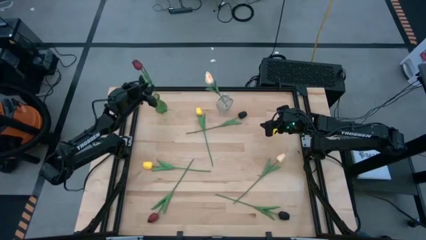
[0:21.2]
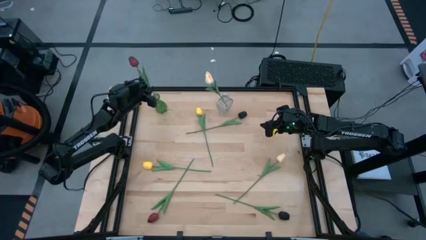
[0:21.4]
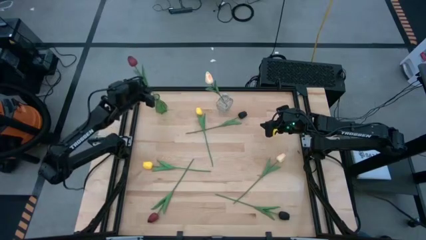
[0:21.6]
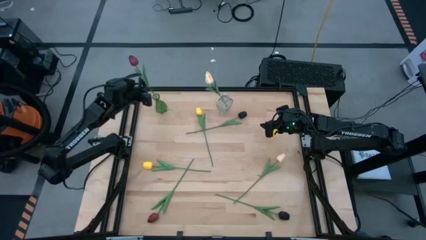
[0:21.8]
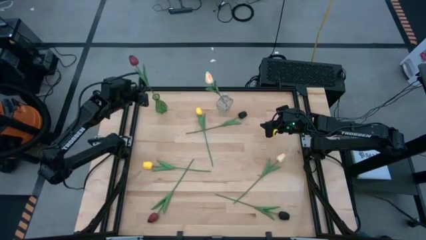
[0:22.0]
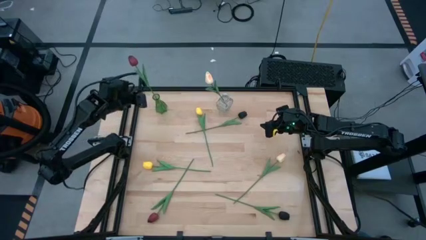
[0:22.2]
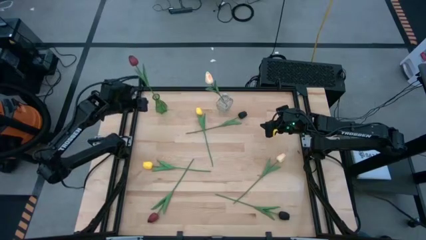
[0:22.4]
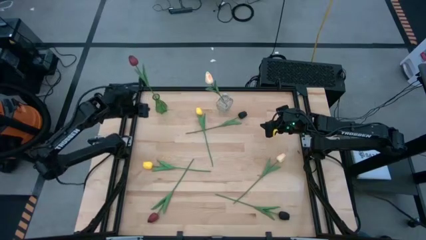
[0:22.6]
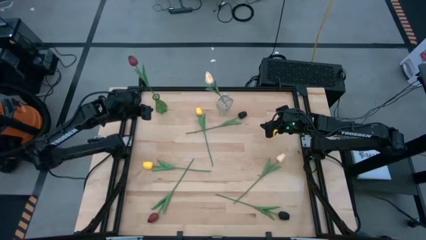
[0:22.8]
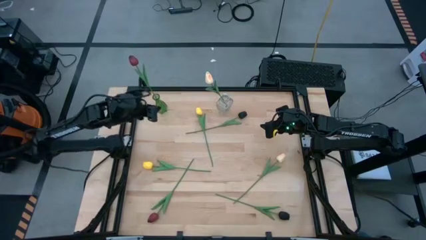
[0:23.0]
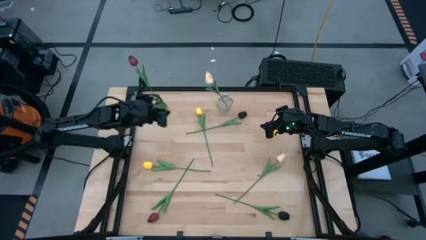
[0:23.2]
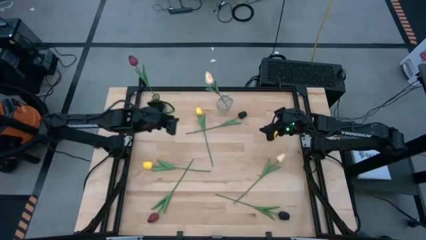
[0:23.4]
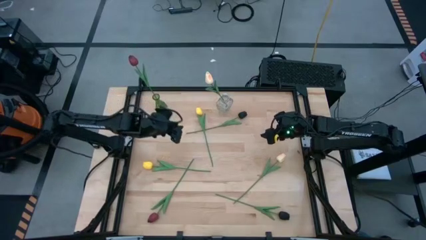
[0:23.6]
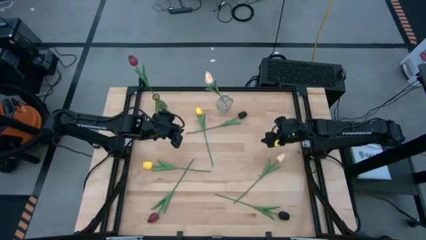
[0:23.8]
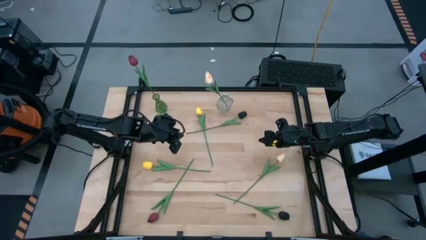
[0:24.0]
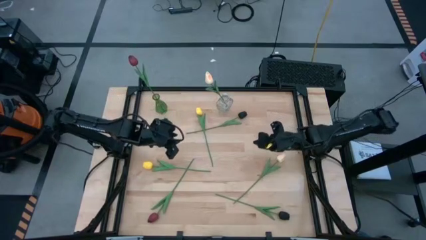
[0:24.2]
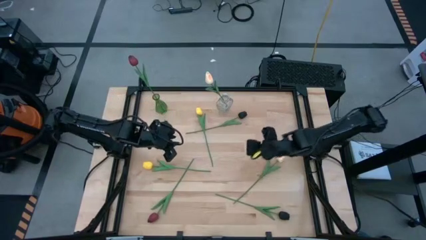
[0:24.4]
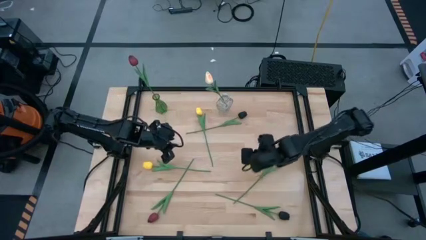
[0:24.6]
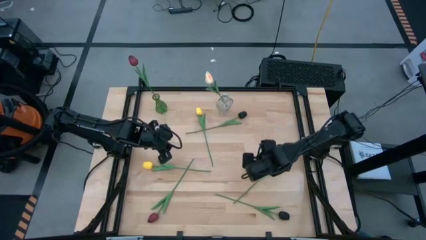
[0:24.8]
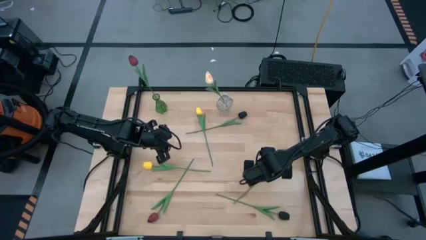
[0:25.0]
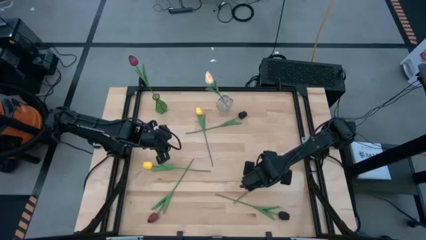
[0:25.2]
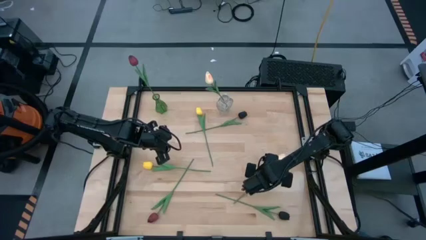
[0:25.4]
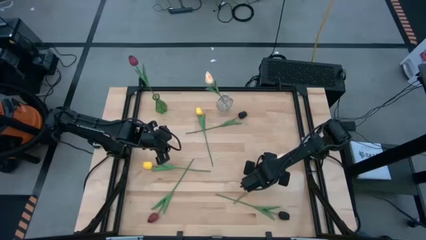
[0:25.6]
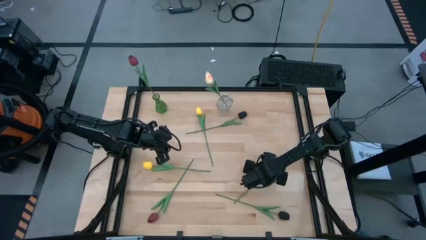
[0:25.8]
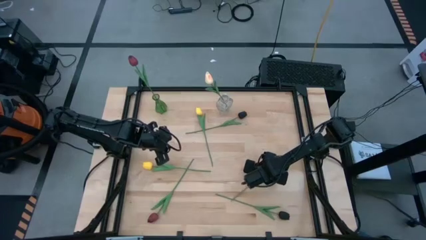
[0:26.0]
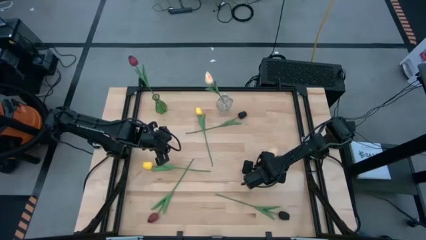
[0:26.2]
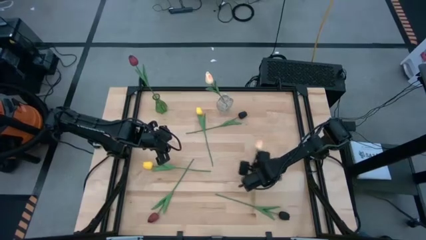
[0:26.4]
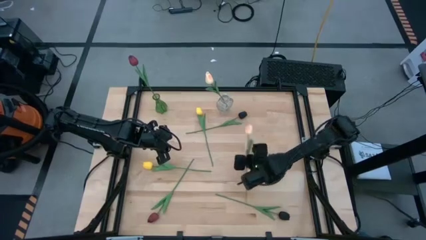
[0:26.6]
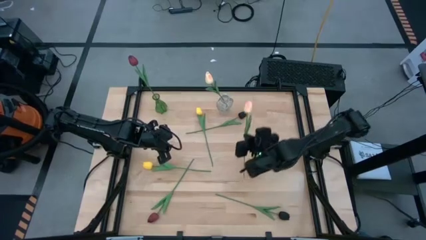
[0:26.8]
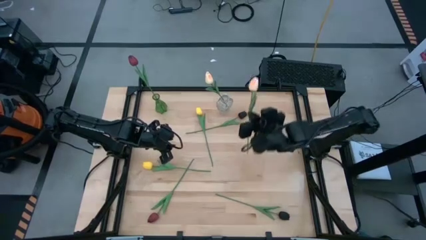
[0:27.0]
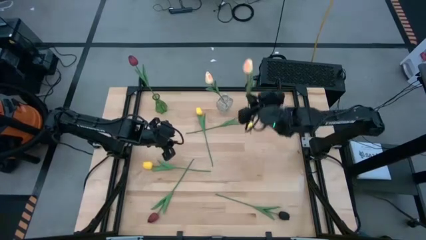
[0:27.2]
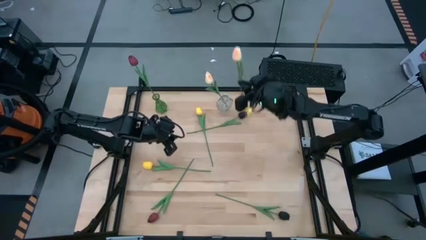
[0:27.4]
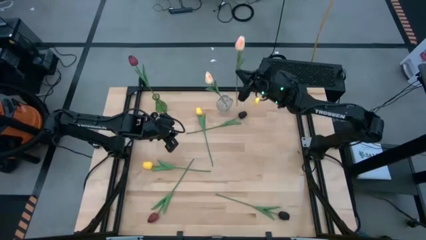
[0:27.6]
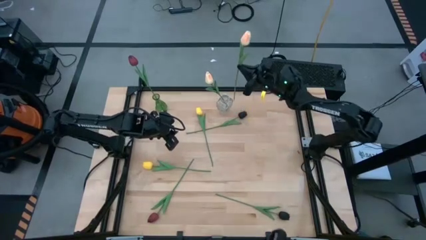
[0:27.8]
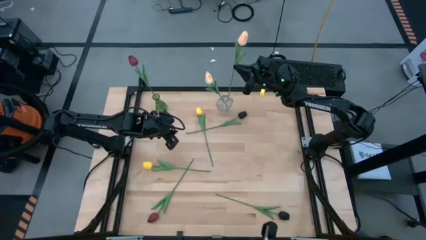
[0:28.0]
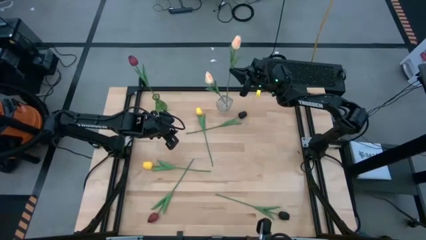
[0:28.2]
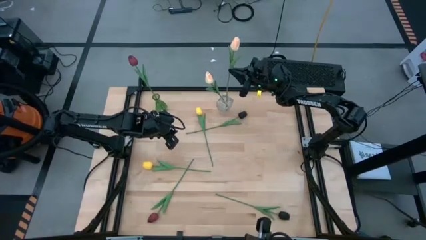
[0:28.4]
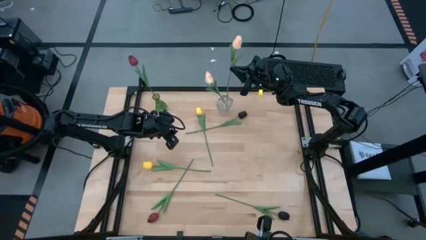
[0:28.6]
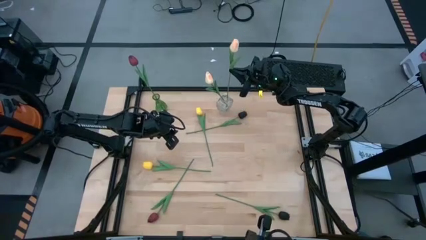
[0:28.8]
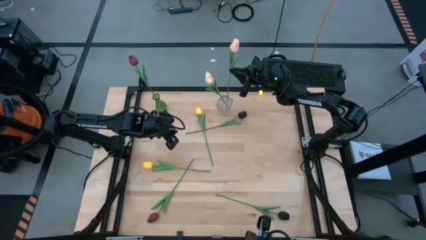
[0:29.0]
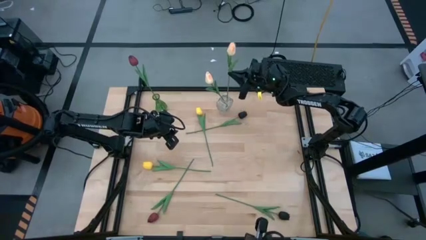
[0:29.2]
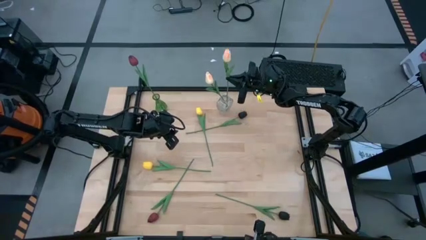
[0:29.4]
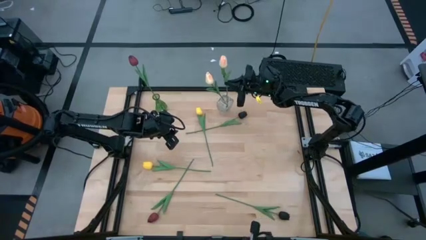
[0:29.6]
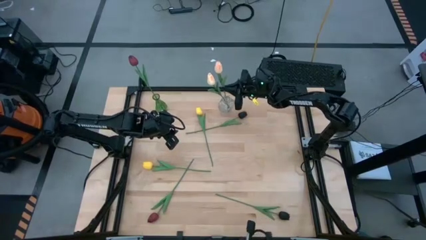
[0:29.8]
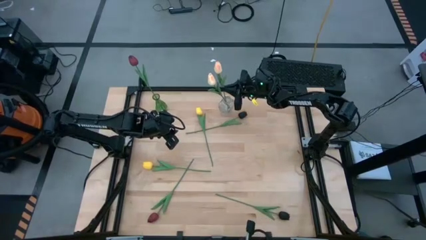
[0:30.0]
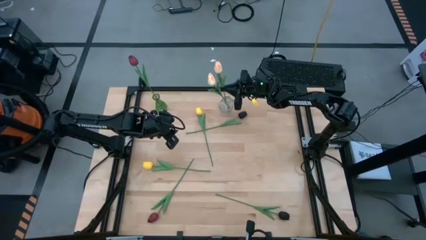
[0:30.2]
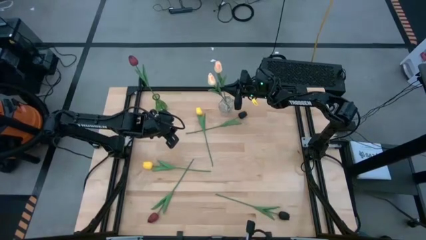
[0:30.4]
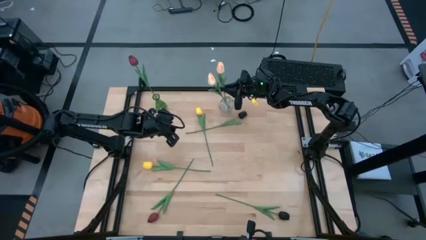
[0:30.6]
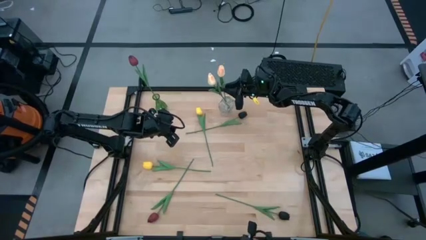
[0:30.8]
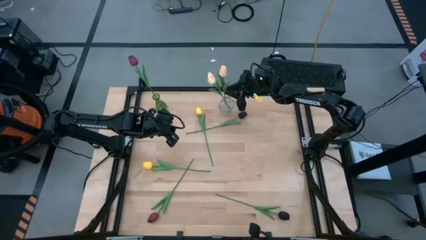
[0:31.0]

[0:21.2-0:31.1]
Task: Sort flowers into vase by color
Put the light pink tulip into the transparent vase
